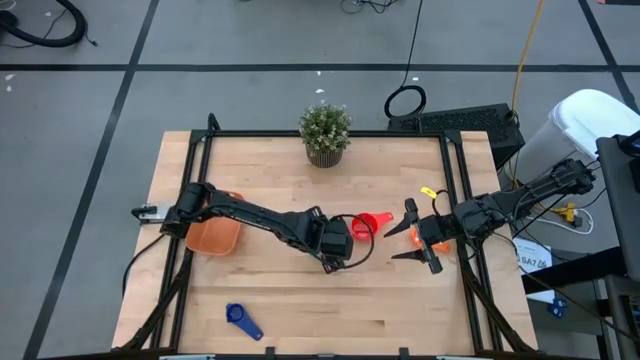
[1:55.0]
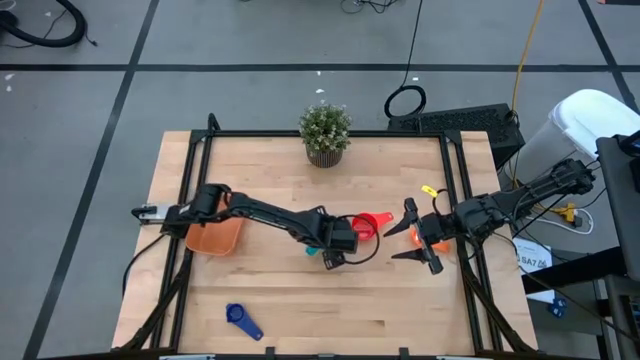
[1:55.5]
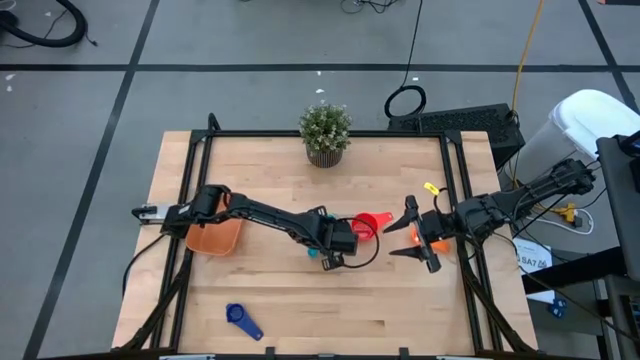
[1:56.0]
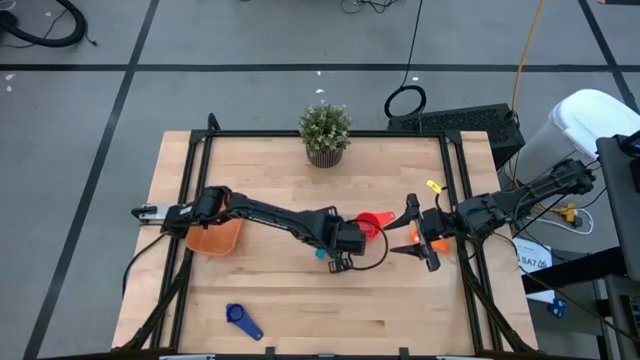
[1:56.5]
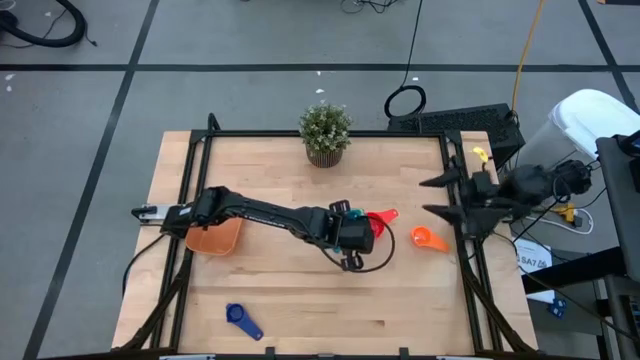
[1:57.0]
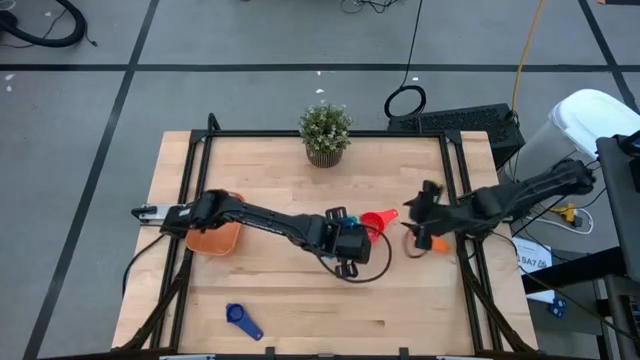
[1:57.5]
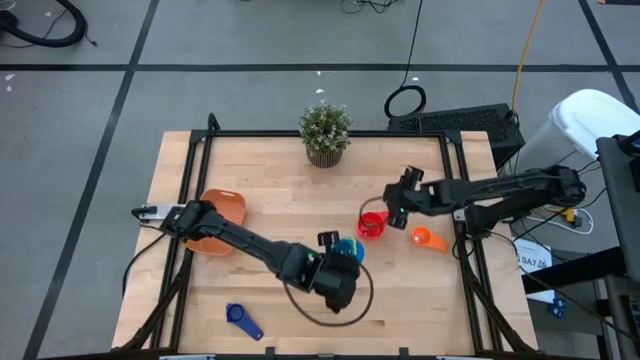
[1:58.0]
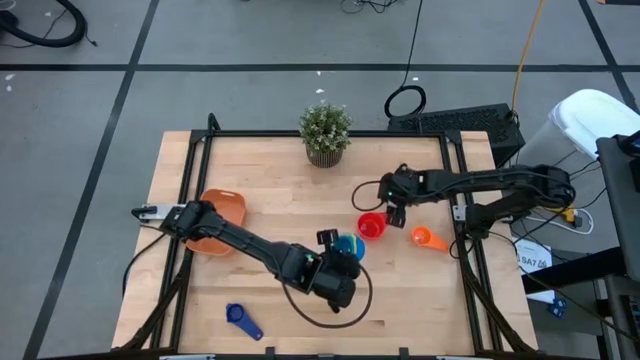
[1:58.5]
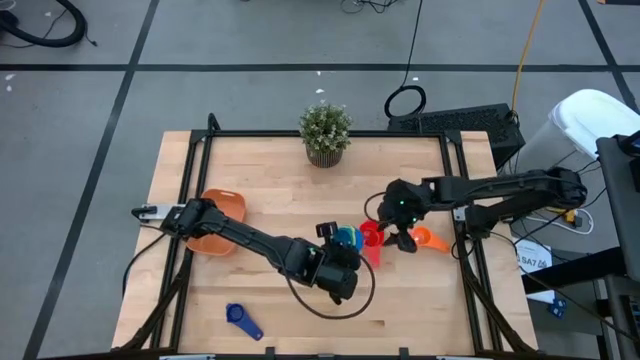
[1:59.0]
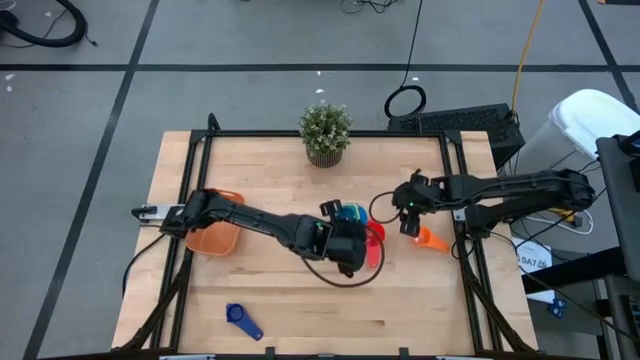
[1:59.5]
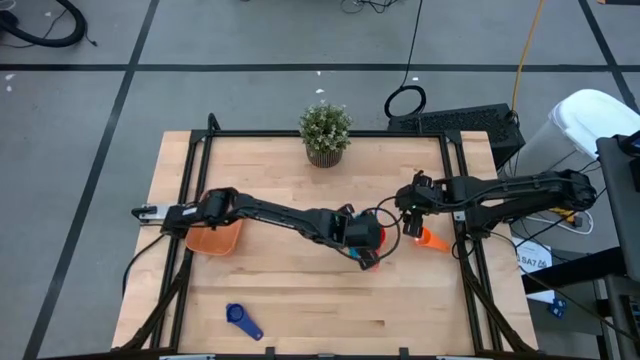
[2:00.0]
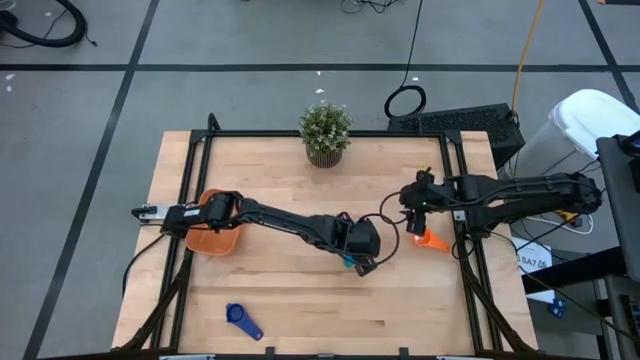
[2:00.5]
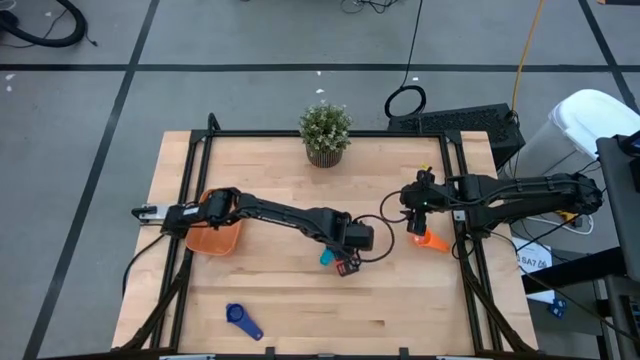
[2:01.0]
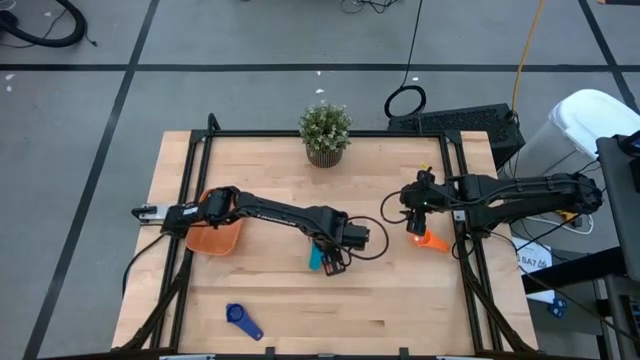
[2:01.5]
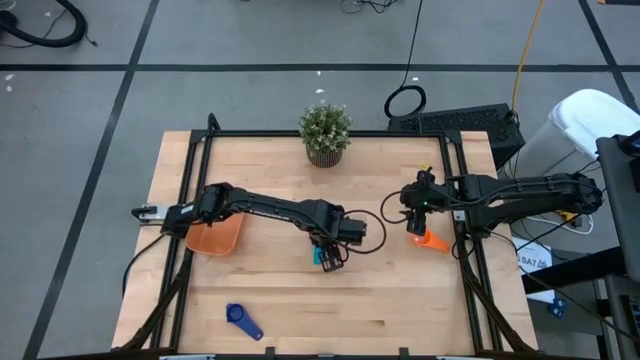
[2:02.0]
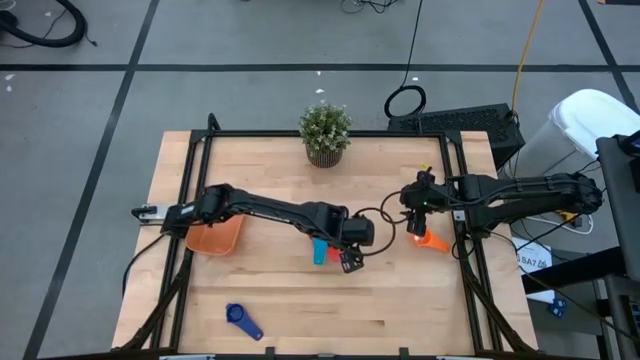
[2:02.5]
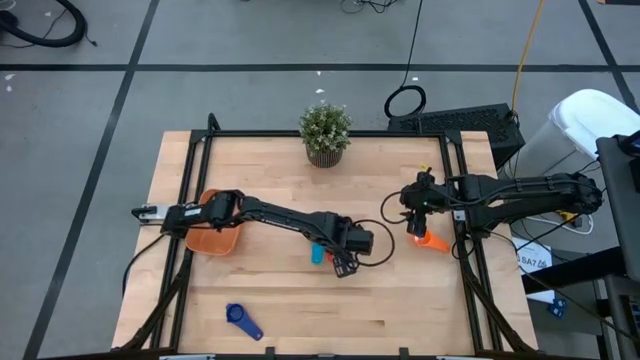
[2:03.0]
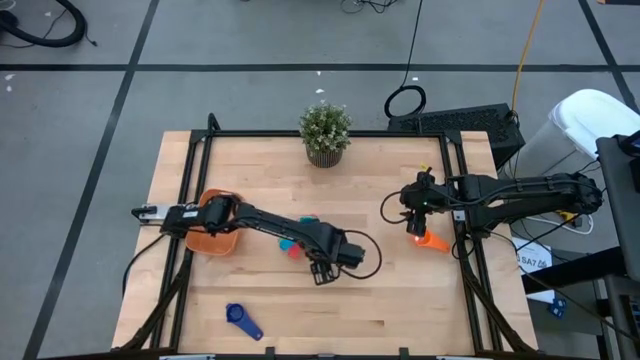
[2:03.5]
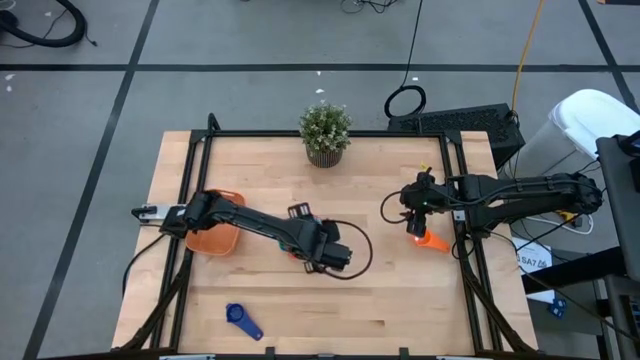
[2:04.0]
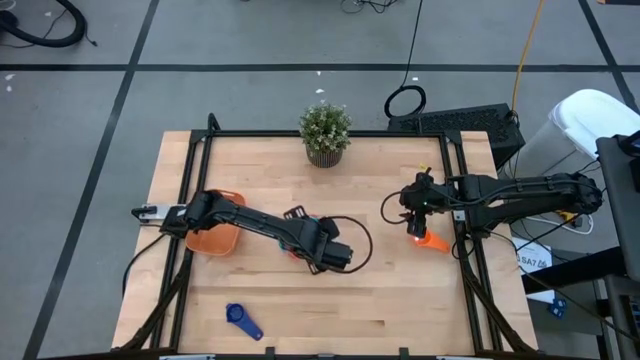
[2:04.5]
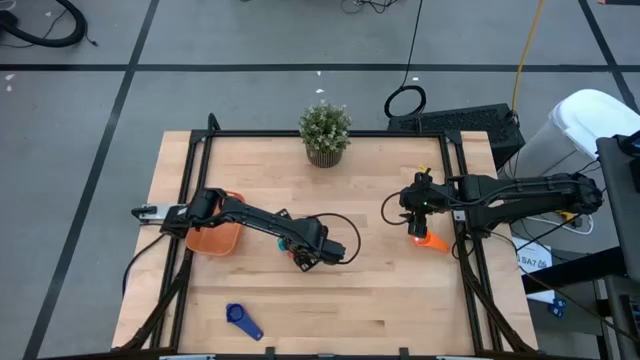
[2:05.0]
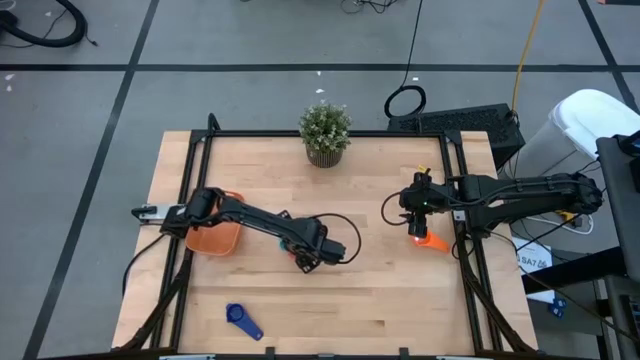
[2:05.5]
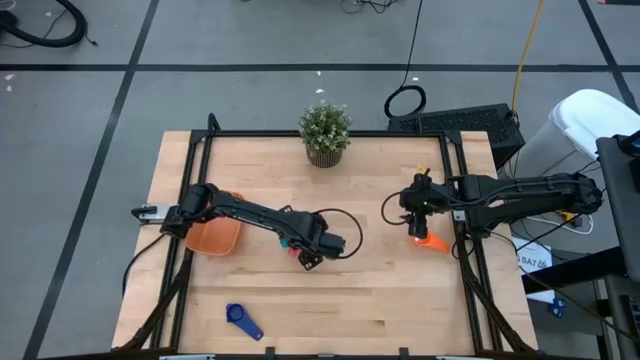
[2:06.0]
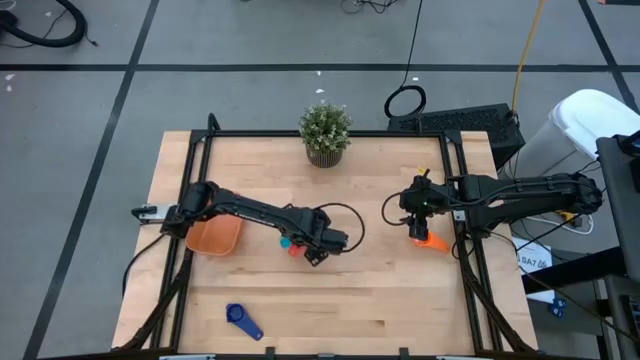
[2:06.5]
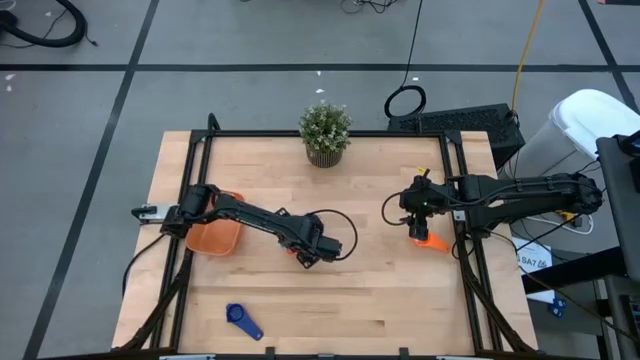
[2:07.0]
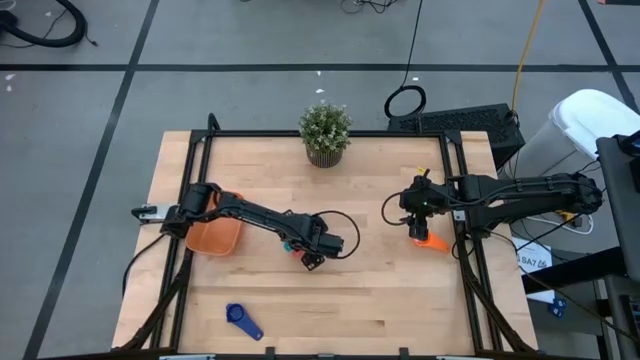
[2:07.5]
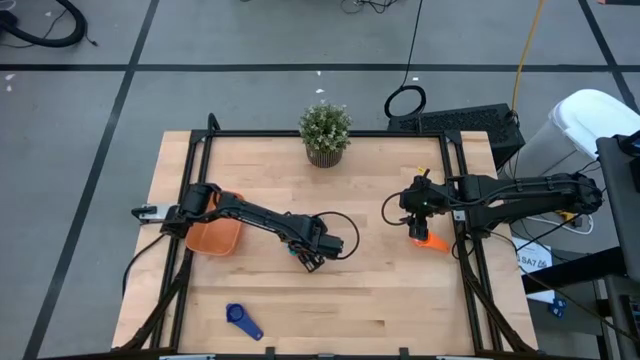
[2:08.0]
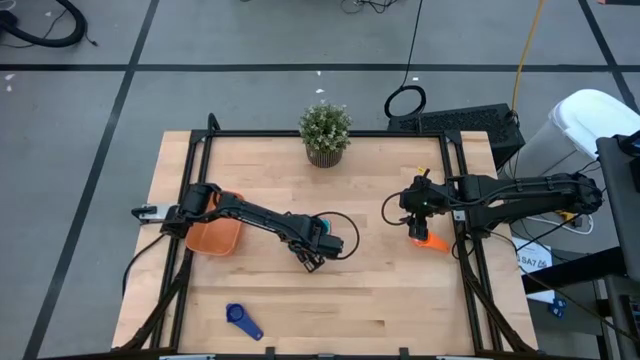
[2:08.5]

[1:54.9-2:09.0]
Task: Nest measuring cups in basket
Stack the stacked measuring cups on top of the red measuring cup

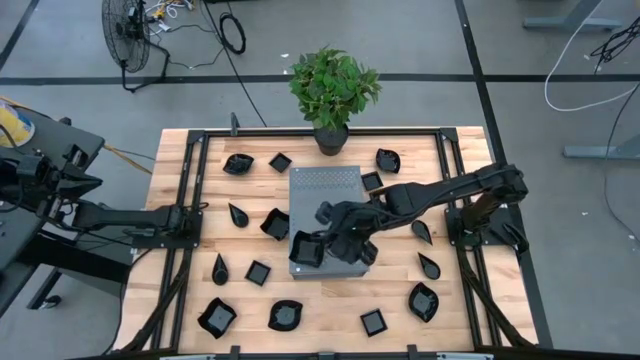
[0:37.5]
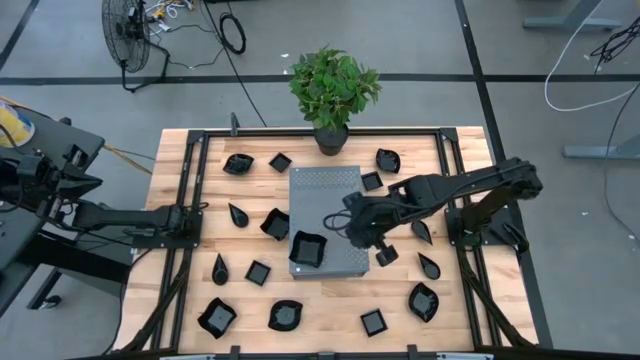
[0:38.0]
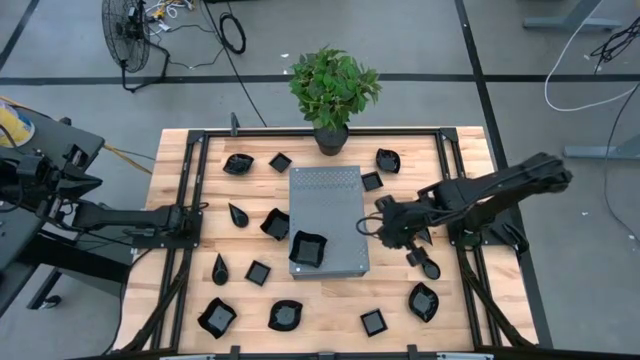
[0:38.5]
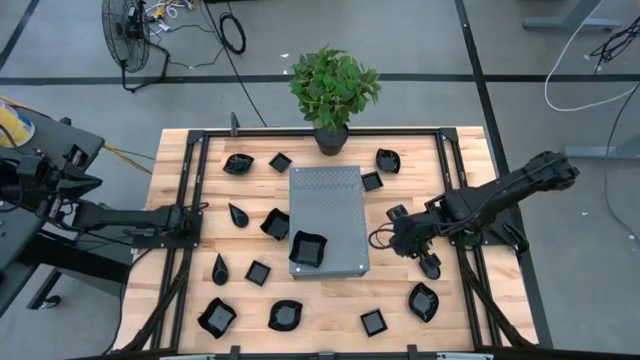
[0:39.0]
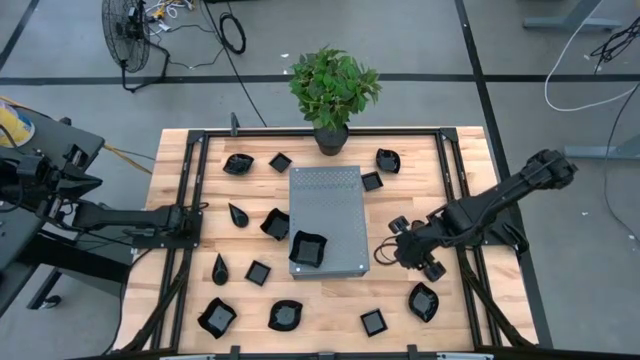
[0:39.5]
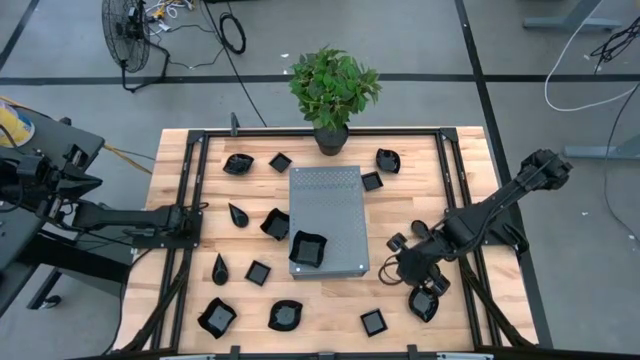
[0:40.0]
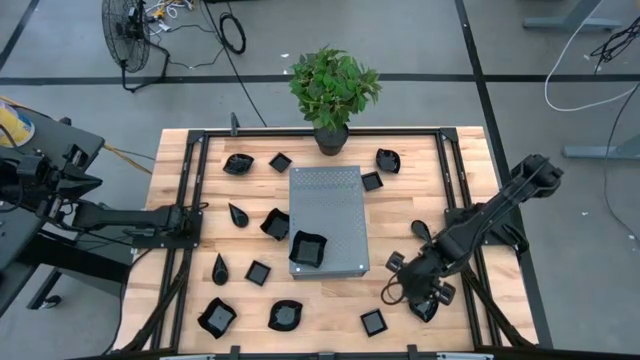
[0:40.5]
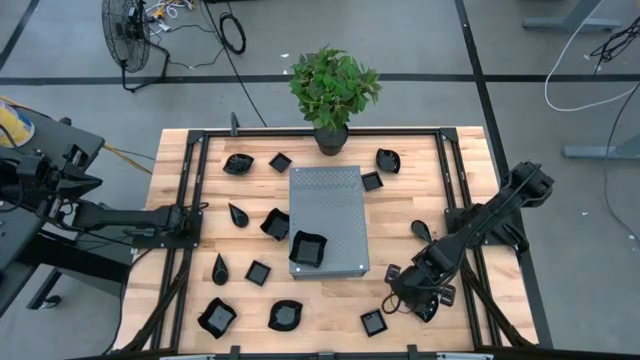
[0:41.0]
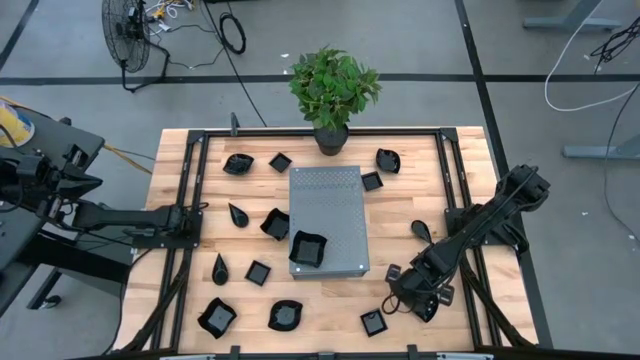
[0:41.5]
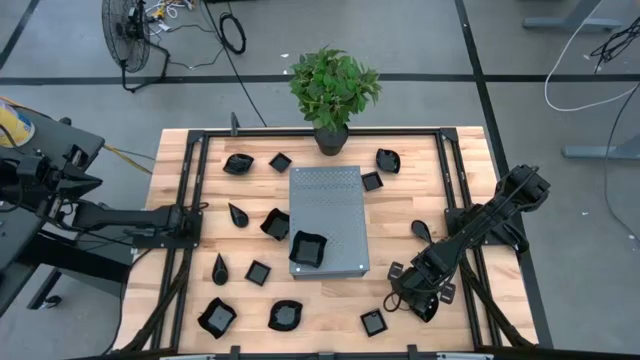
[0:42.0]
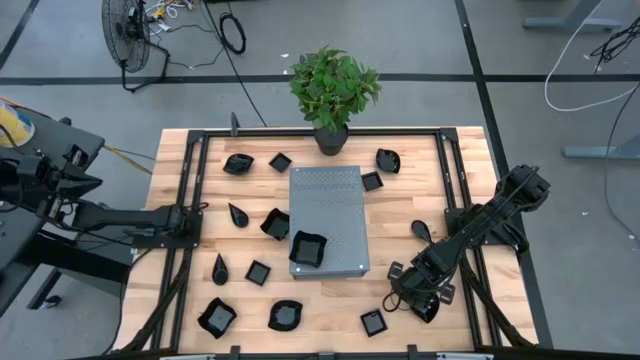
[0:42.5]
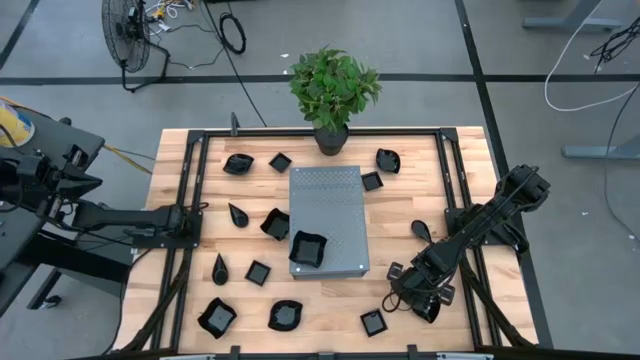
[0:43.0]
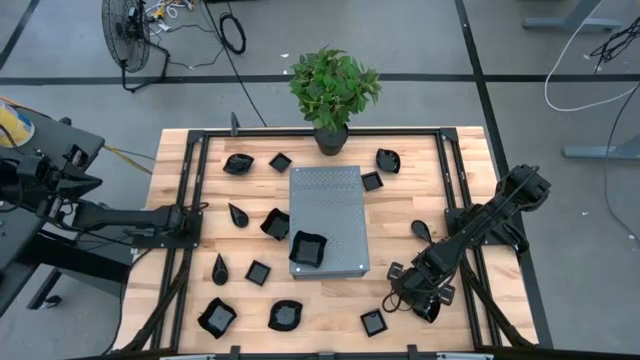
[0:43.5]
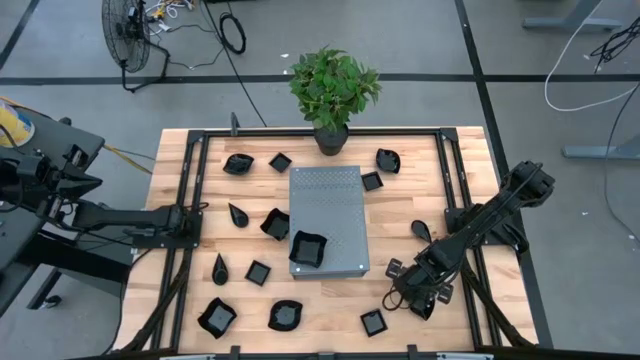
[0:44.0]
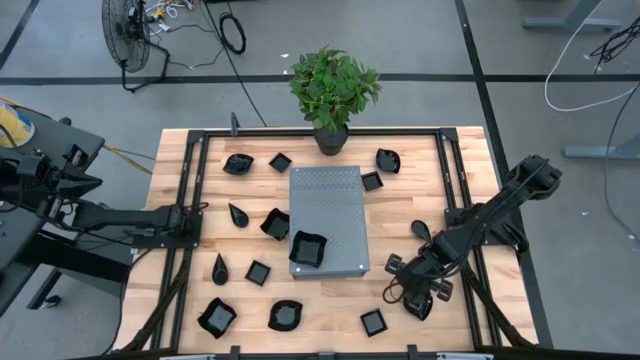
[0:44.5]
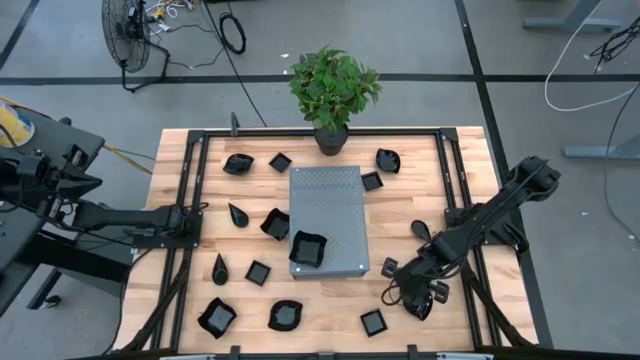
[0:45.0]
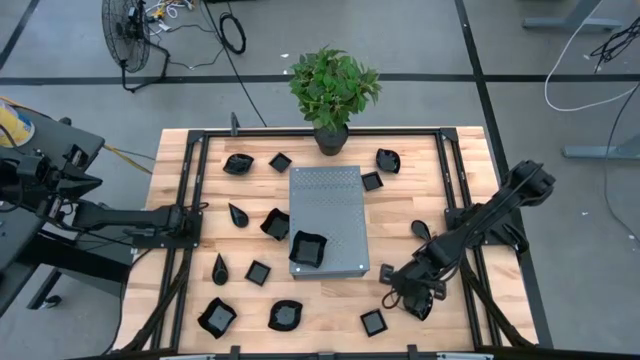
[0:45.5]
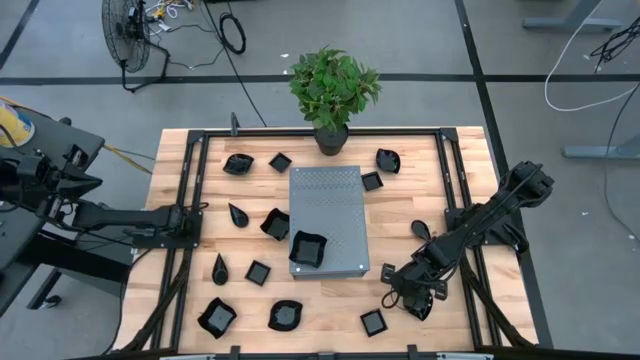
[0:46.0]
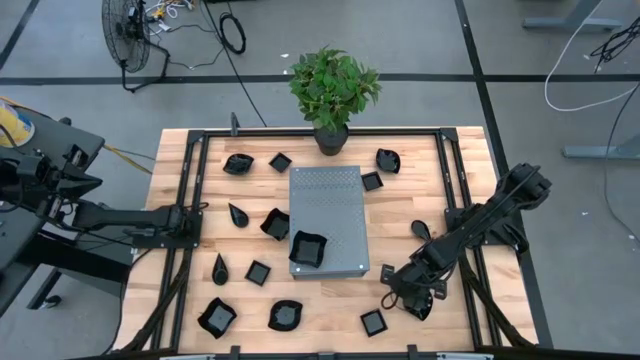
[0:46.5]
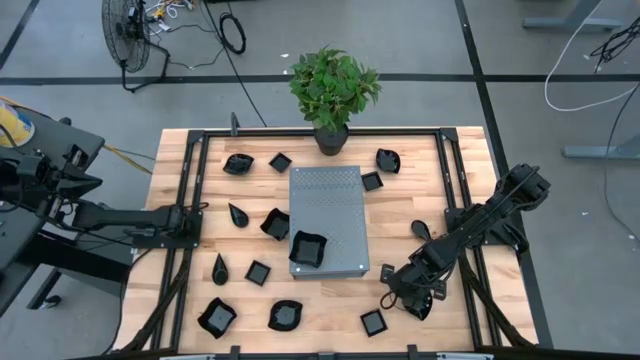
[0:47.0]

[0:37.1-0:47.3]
Task: Pick & Place Mini shaped plates
Put the black bowl on the shelf
